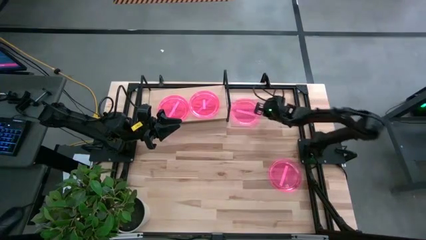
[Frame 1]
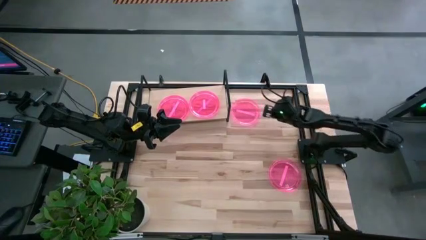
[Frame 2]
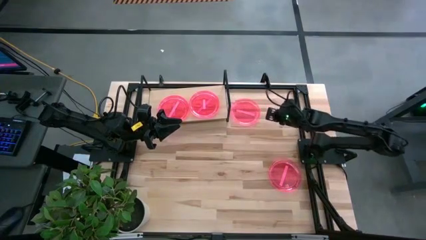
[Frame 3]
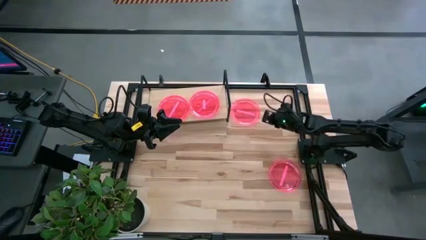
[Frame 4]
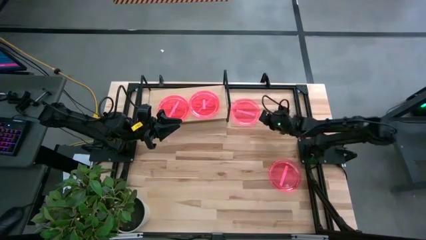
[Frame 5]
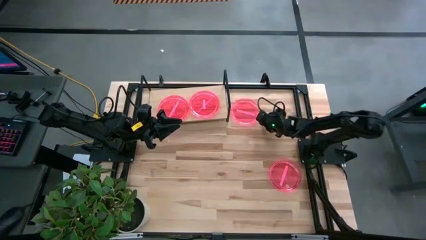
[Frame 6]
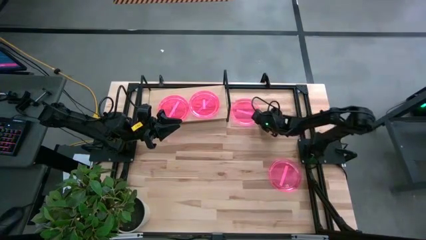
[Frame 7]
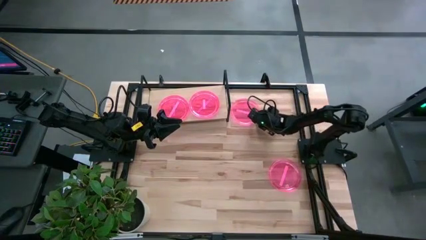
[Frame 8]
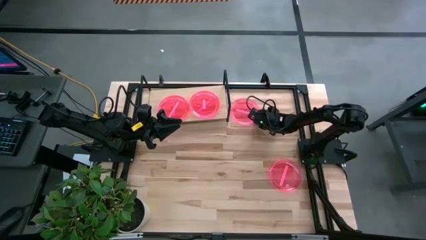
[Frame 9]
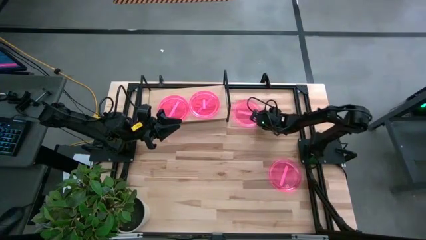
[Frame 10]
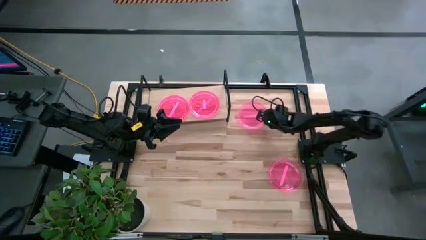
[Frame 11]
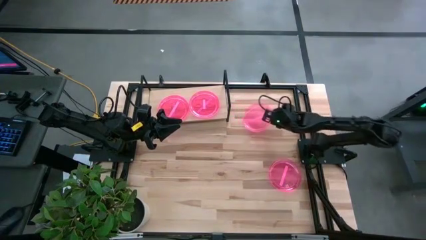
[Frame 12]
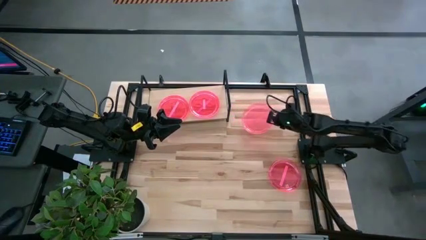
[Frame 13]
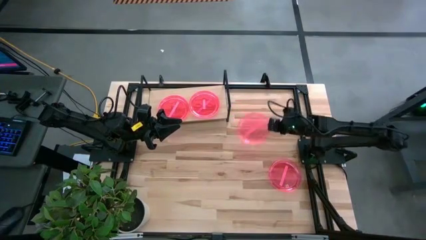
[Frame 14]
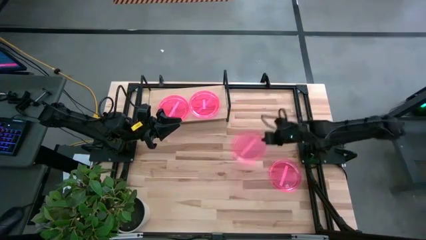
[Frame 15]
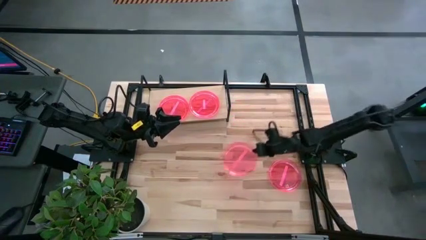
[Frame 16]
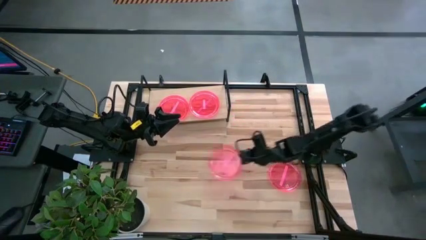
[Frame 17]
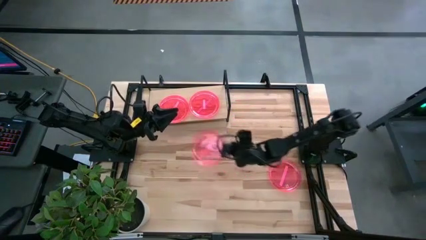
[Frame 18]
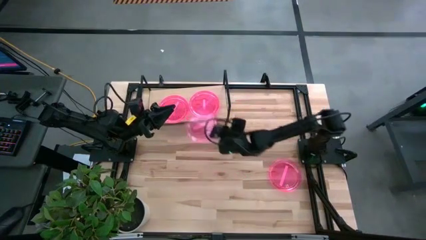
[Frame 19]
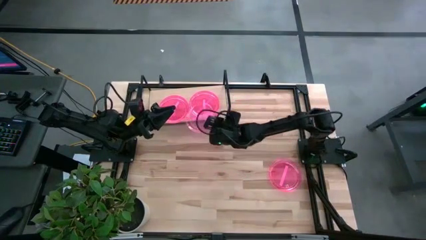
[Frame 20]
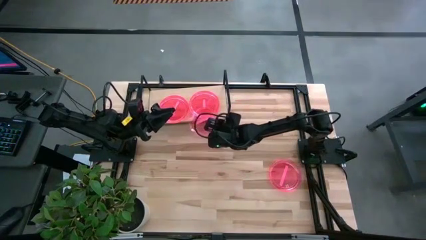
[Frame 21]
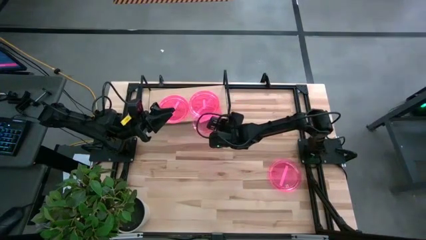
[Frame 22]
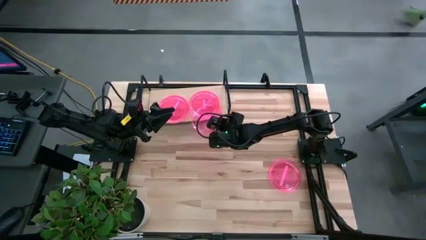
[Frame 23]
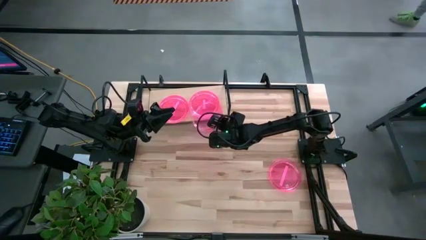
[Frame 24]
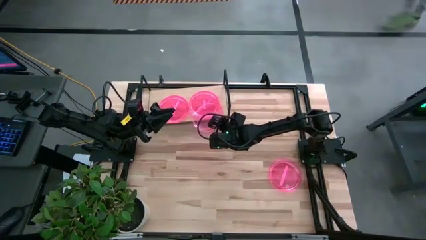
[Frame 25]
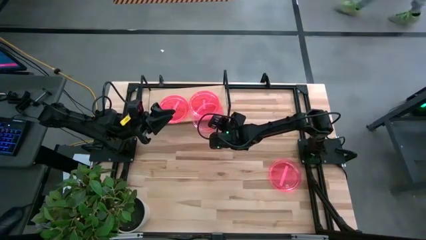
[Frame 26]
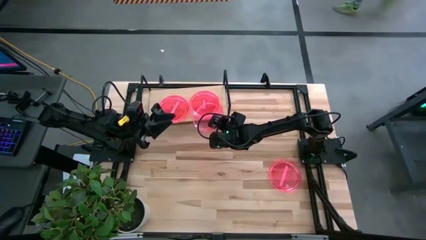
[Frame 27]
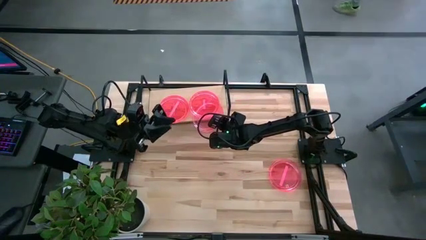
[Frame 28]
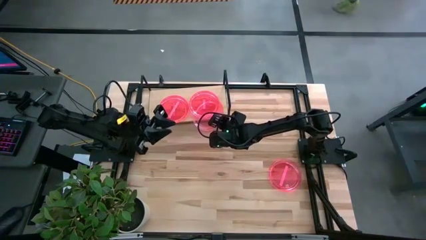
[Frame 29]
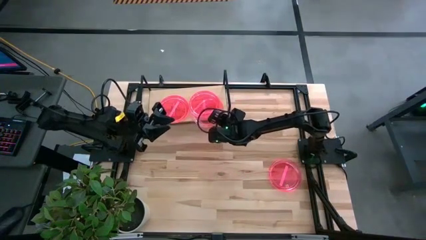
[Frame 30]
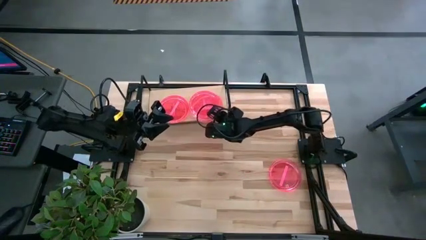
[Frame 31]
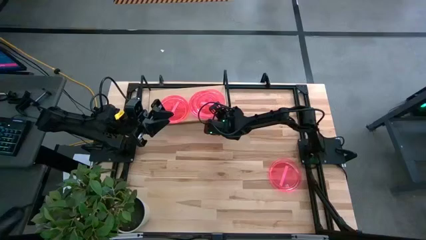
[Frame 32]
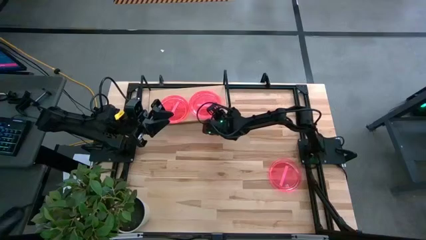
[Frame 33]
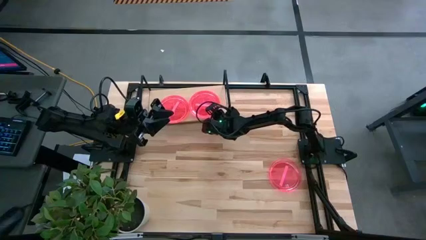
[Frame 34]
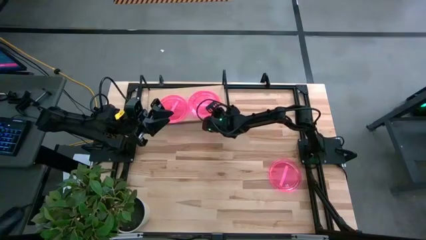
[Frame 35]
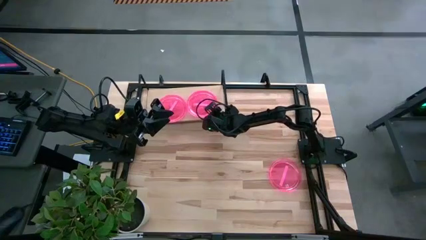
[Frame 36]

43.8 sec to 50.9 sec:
Task: Place and stack plates onto a shelf
Stack the pink plate on top of the pink plate on the shelf

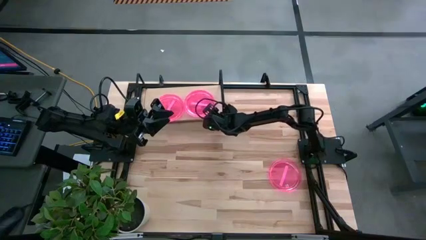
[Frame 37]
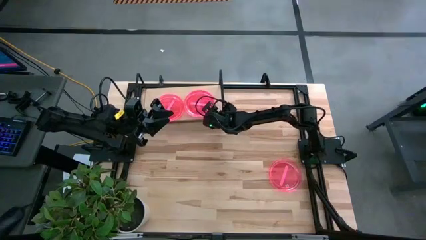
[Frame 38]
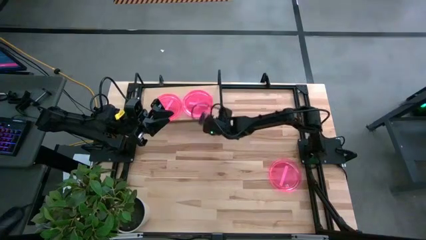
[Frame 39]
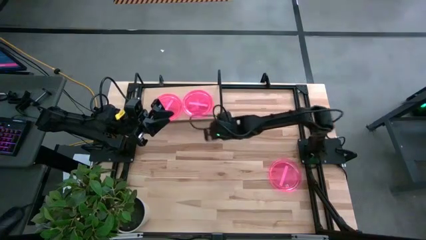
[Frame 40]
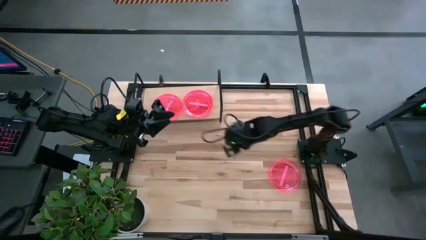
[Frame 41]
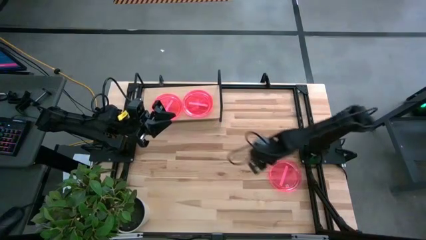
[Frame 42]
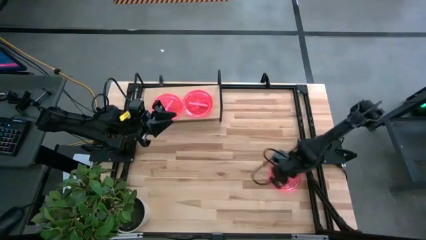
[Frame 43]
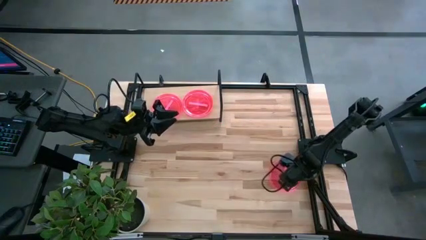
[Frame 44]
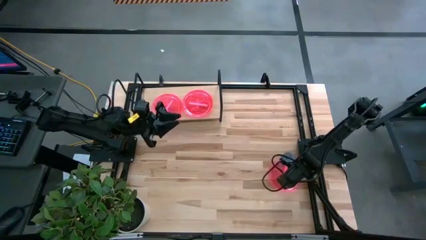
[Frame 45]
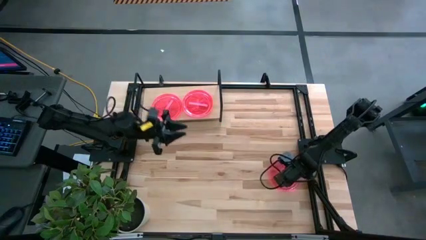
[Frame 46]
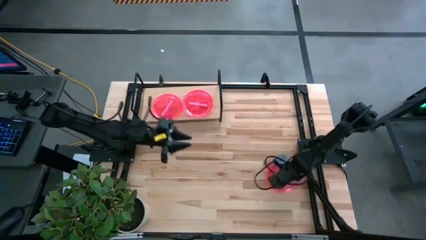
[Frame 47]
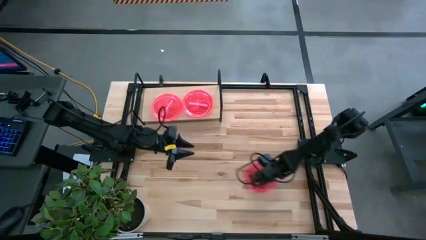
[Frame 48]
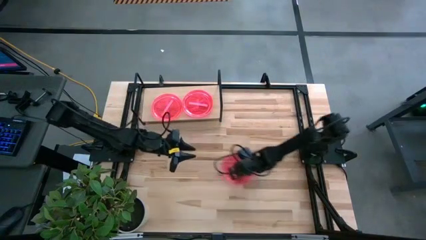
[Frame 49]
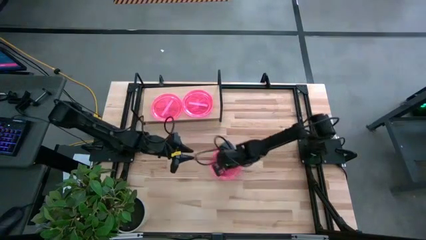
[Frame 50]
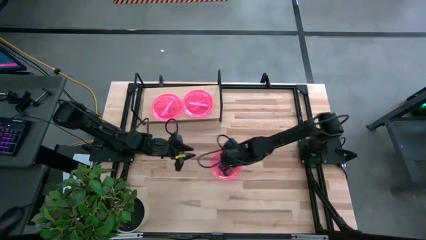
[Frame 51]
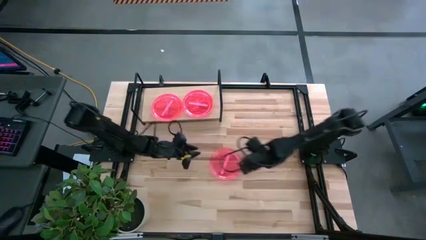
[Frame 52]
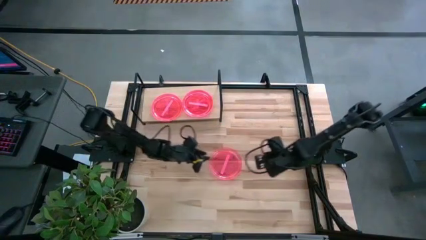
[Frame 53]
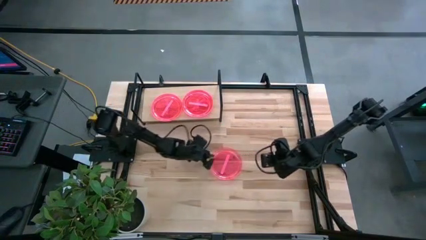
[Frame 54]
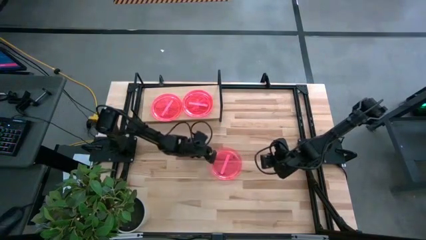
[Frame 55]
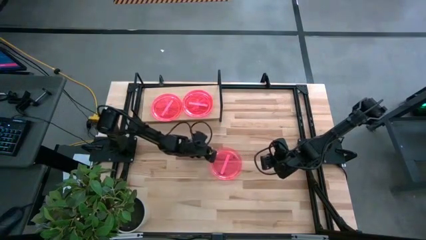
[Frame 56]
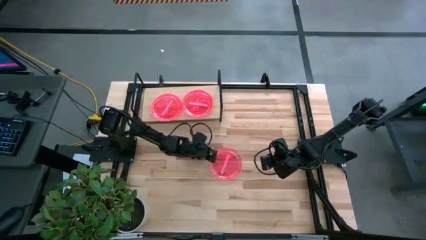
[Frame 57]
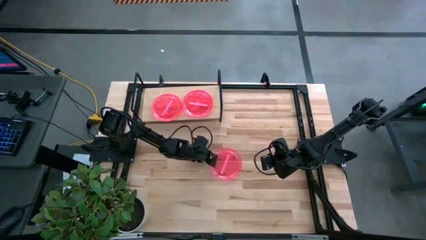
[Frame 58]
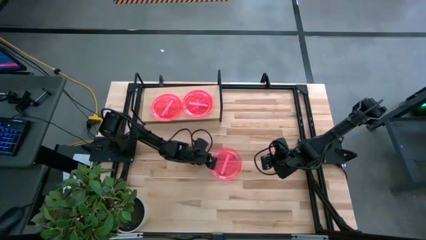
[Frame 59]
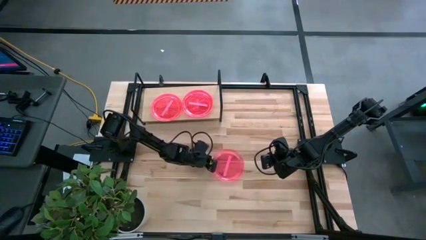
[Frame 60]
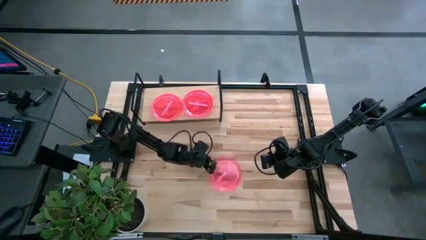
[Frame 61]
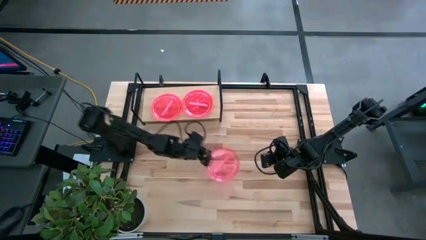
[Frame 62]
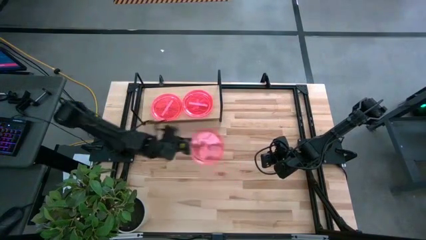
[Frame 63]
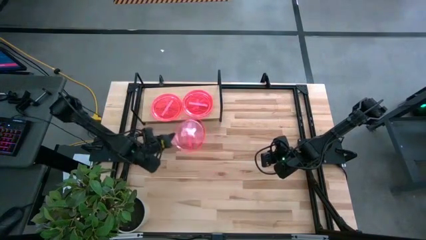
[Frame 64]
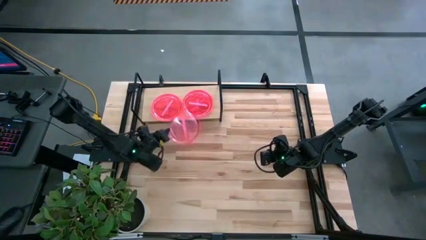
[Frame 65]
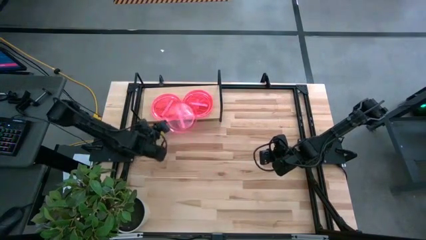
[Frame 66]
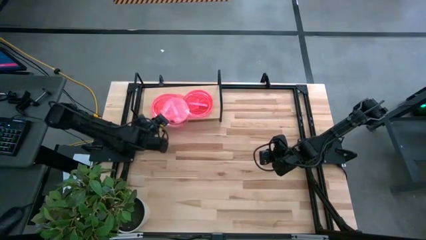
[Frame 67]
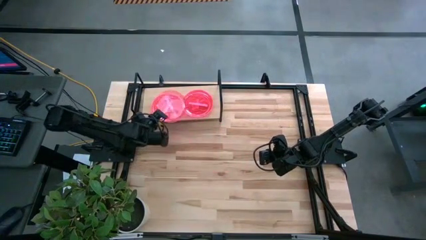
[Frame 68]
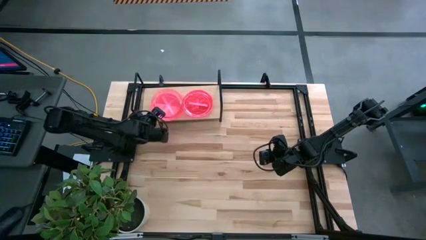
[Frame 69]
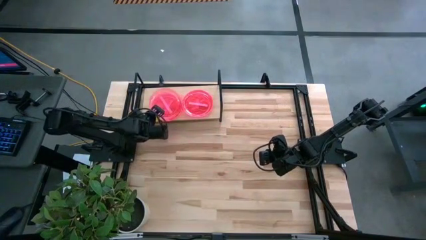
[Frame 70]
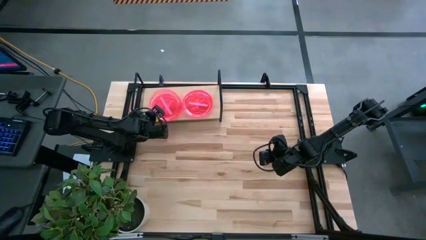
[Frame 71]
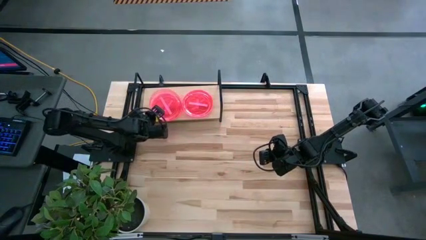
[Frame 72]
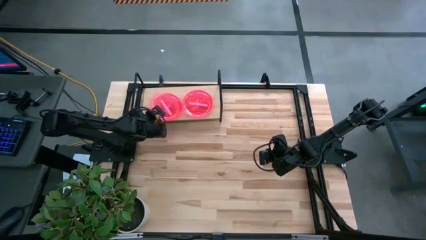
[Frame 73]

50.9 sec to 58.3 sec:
Stack the pink plate on top of the pink plate on the shelf

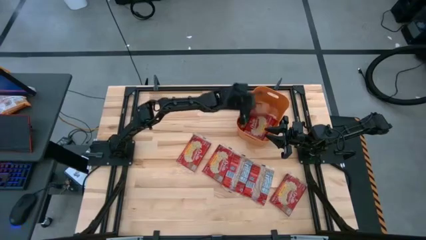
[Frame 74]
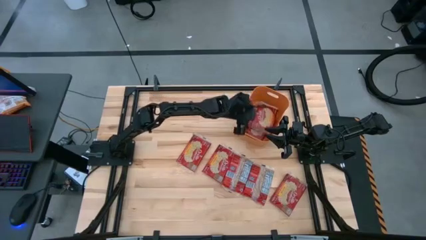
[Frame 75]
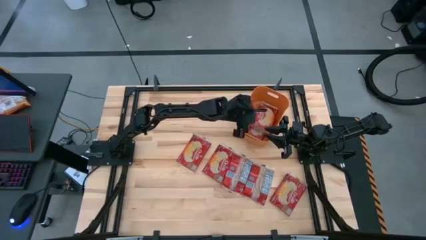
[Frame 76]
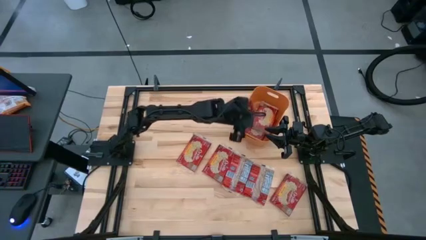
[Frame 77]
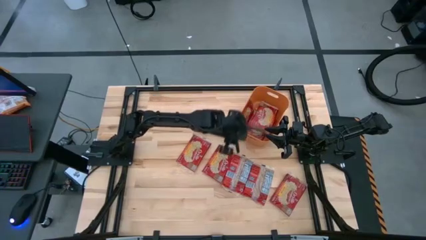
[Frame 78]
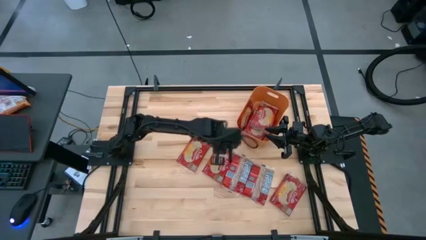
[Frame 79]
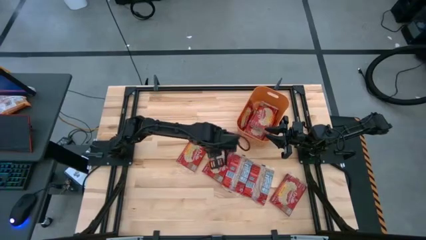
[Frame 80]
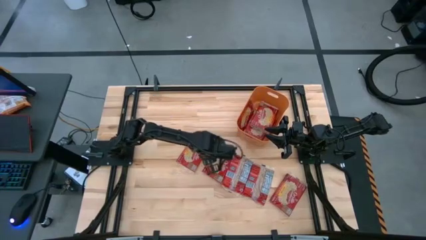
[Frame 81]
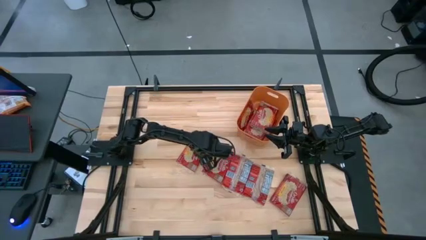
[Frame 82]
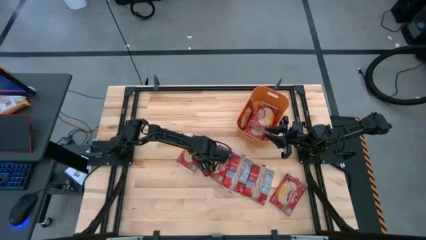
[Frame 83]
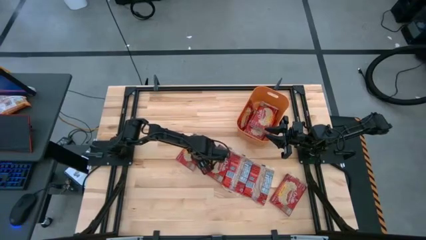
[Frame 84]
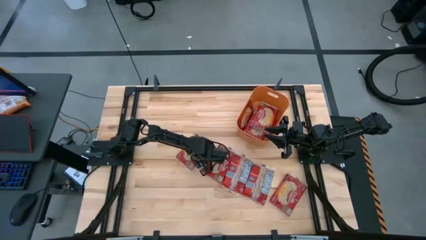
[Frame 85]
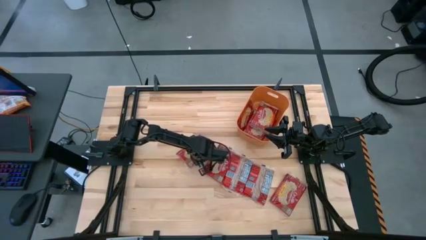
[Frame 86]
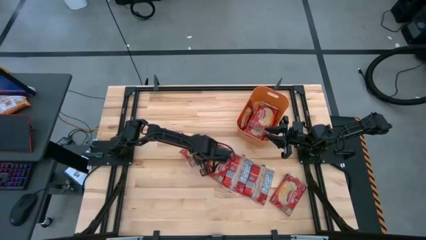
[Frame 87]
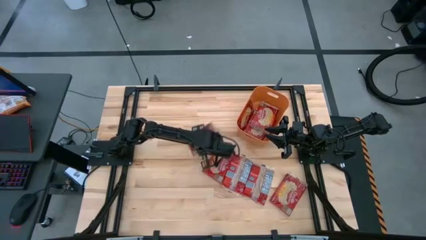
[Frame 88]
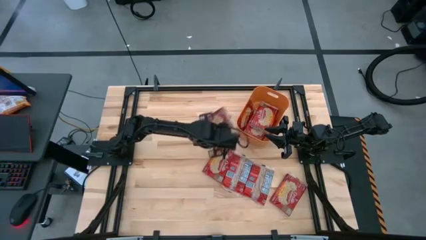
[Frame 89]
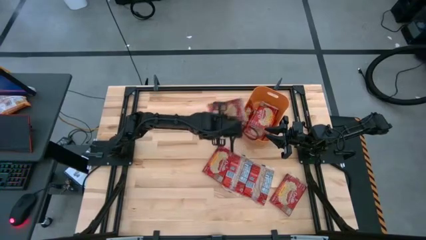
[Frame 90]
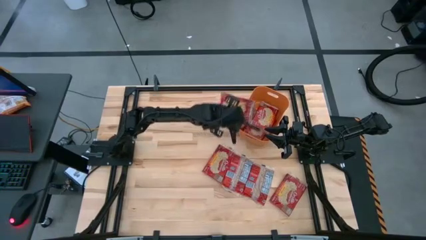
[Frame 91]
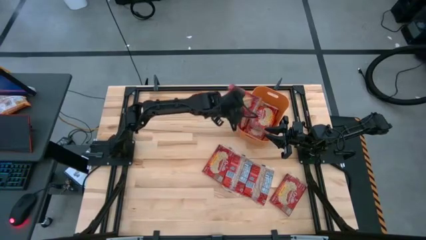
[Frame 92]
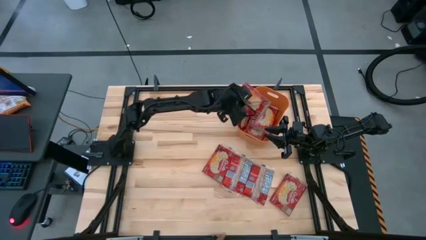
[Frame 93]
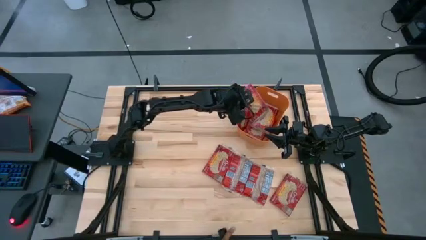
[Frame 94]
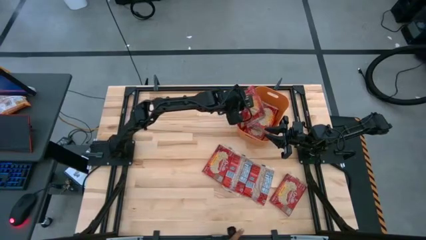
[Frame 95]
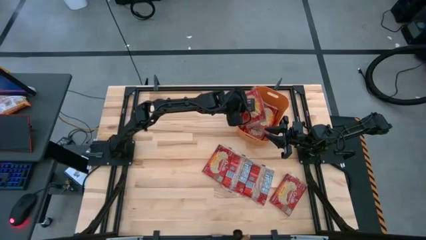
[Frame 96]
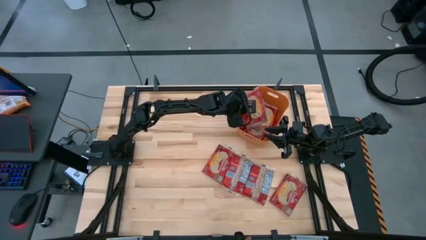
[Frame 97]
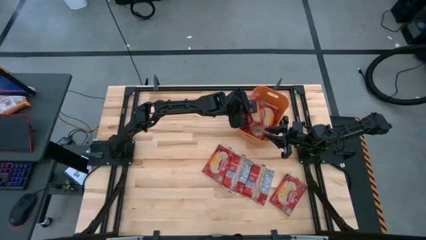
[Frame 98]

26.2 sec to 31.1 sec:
Task: Sort popcorn bags into baskets
Put the red popcorn bag into the orange bin
